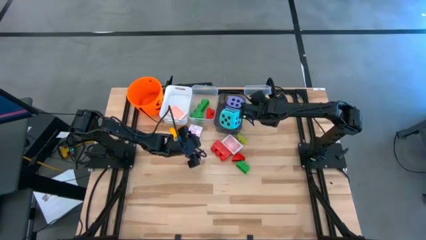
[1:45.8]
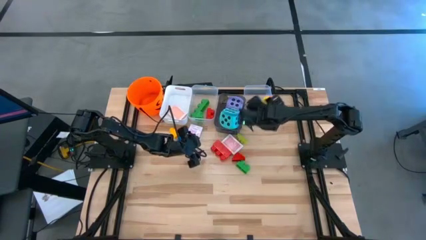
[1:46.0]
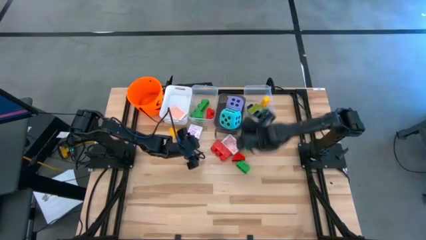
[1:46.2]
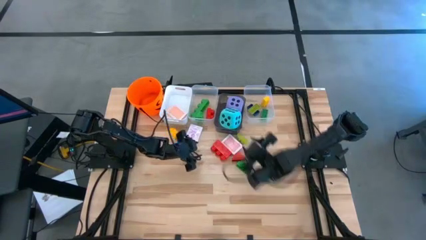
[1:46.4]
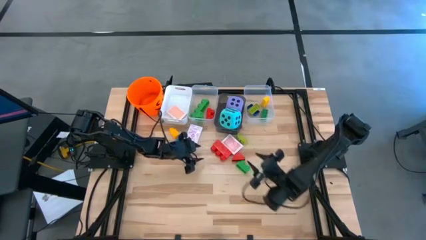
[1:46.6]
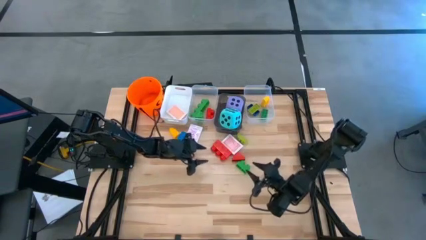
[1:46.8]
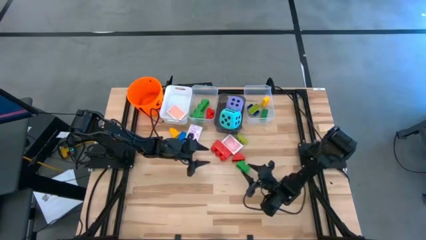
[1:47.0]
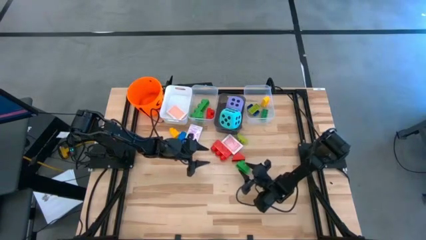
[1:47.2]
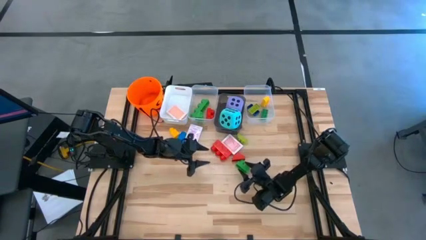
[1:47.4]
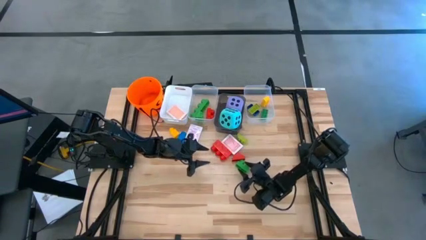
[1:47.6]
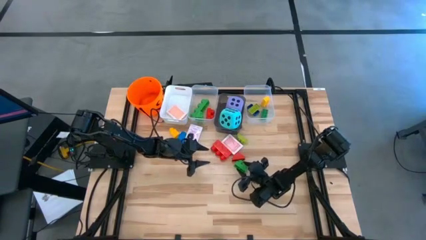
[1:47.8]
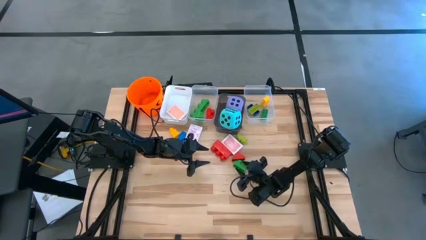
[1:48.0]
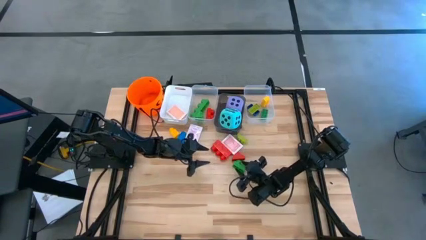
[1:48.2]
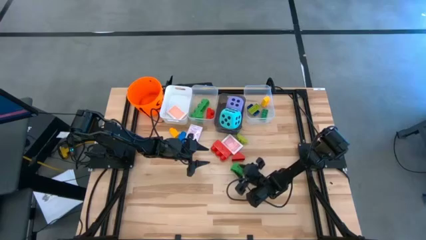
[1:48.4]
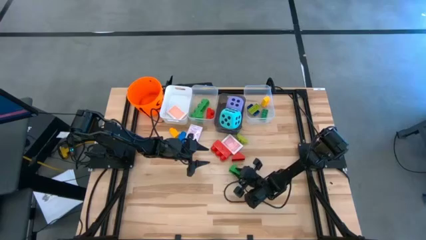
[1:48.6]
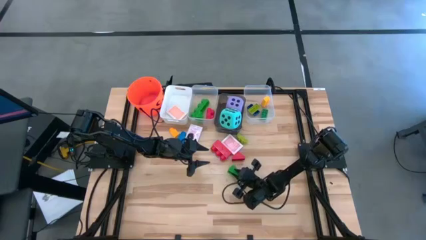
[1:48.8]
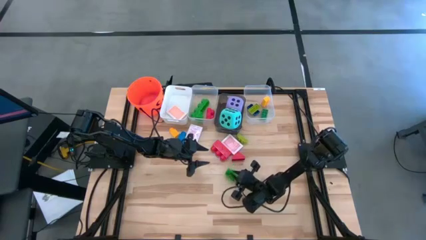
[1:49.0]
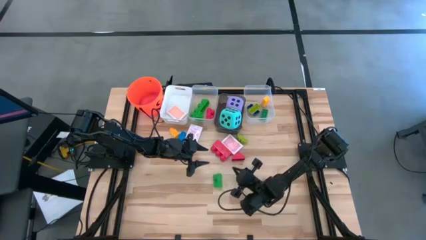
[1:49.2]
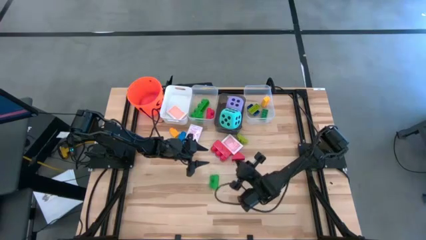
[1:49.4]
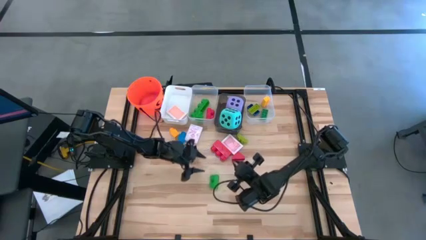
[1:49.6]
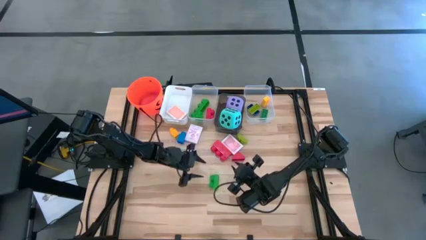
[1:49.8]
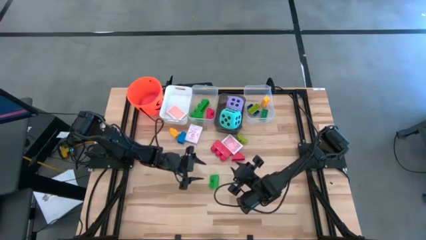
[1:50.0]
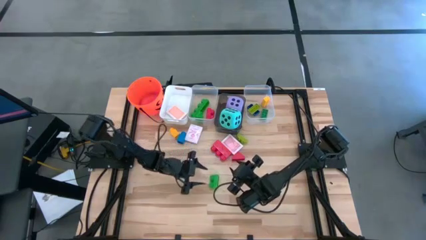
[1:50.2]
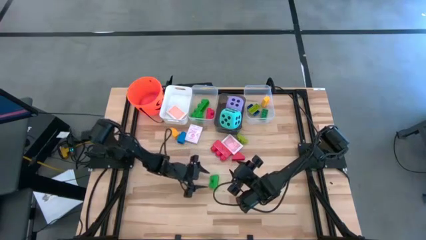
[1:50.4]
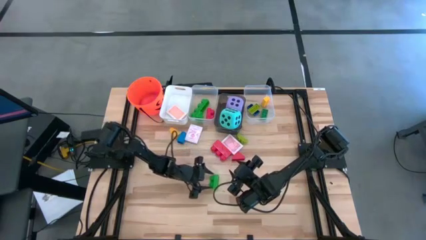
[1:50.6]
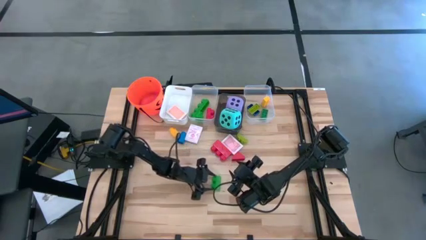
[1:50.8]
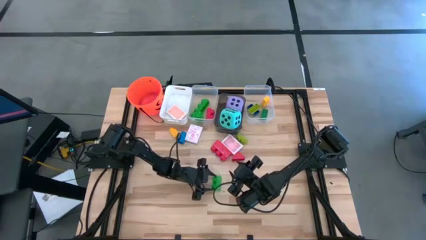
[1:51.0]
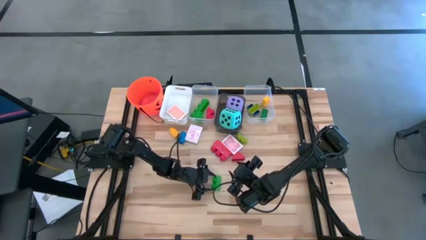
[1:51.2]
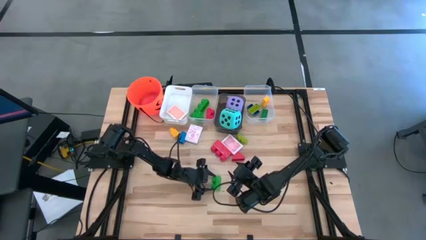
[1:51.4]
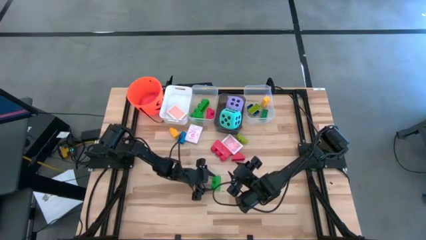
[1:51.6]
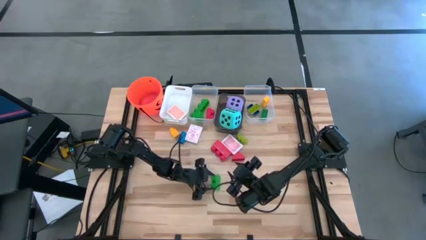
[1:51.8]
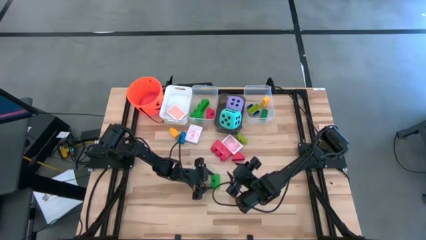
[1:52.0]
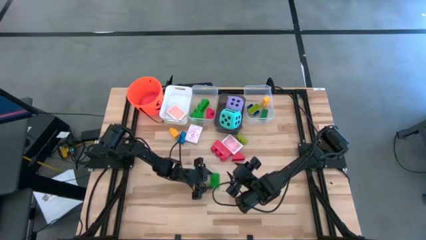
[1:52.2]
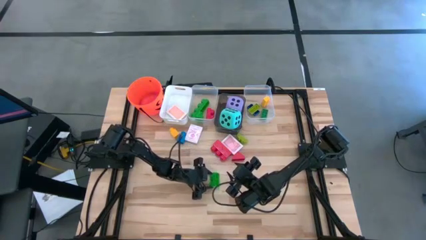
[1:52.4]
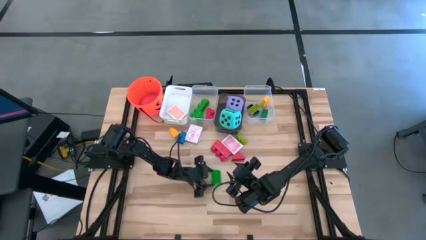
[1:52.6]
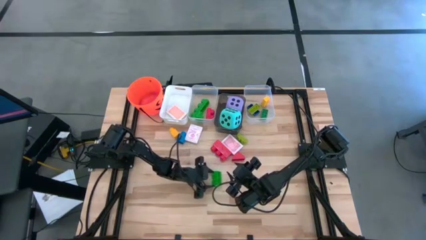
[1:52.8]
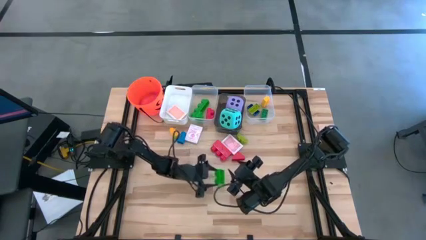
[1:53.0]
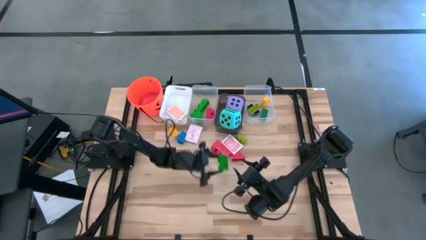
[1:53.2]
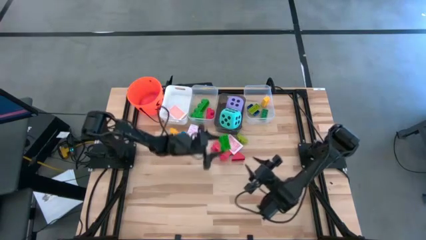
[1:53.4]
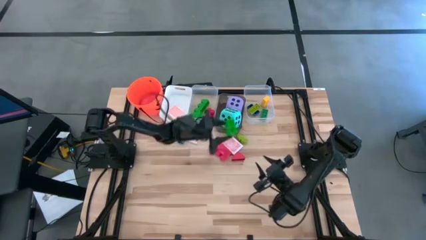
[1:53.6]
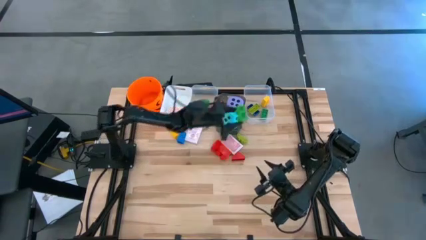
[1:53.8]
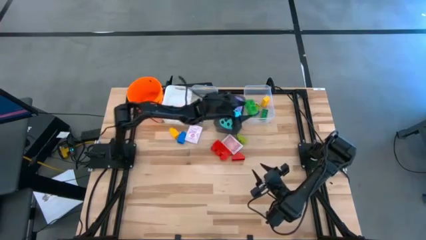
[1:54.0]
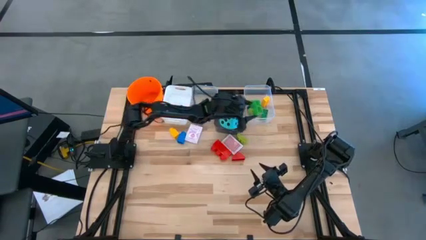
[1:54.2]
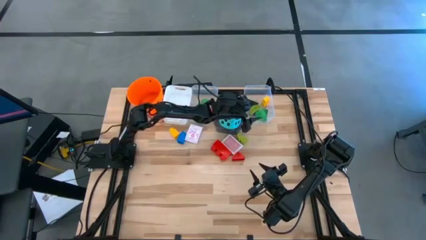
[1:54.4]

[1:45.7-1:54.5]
Task: Pick & Place Toys
Put the large green game piece into the left transparent bin

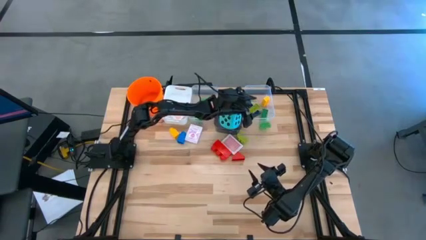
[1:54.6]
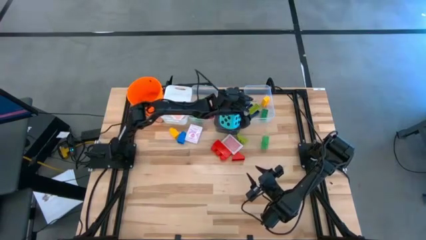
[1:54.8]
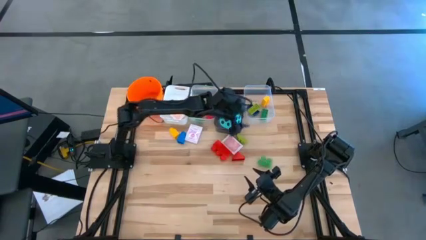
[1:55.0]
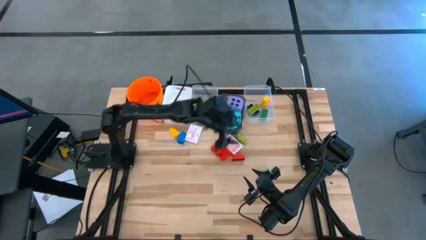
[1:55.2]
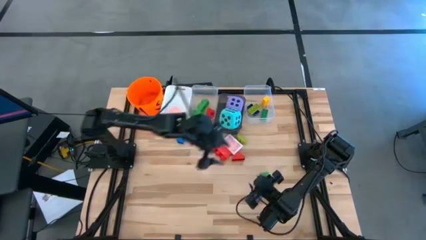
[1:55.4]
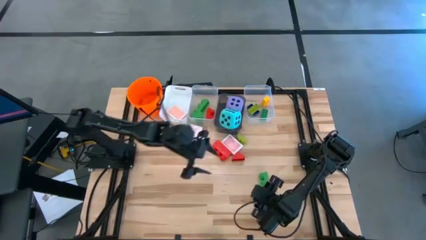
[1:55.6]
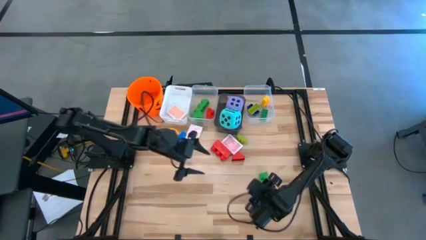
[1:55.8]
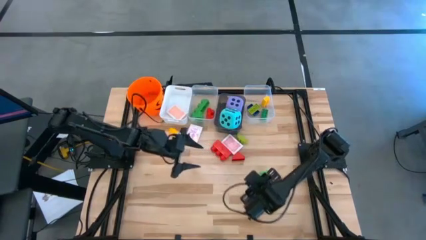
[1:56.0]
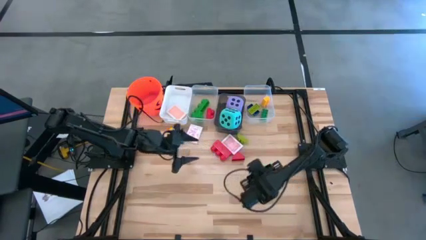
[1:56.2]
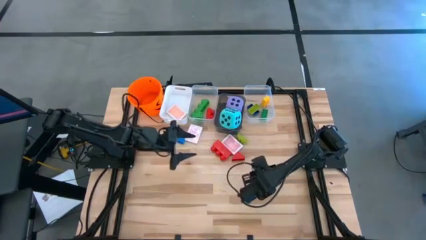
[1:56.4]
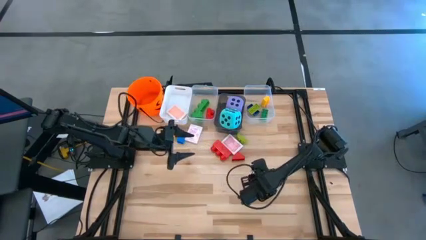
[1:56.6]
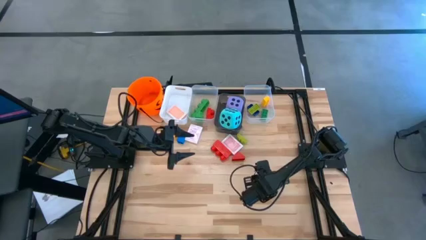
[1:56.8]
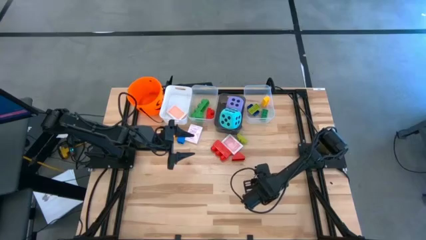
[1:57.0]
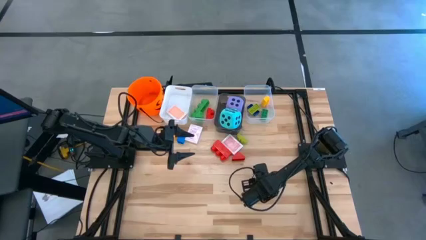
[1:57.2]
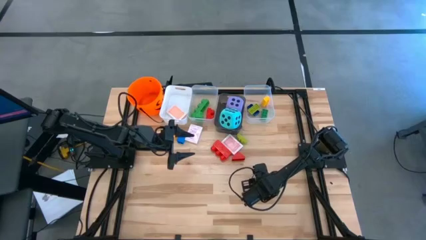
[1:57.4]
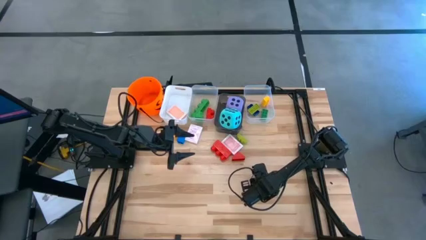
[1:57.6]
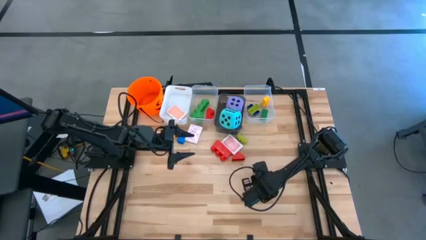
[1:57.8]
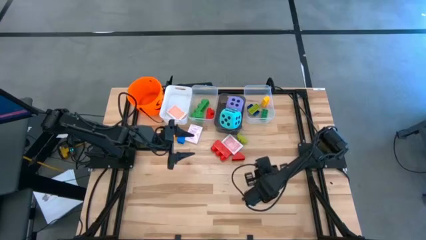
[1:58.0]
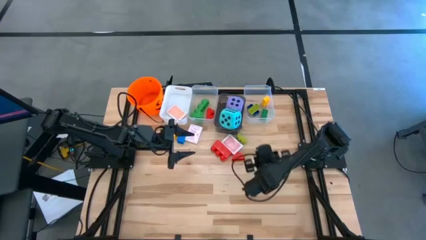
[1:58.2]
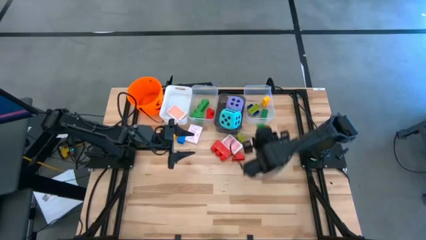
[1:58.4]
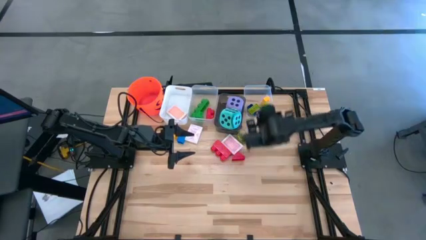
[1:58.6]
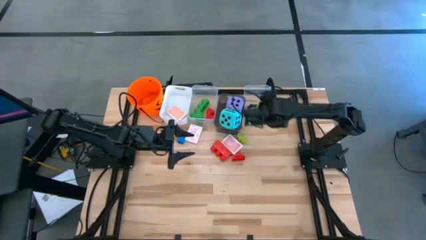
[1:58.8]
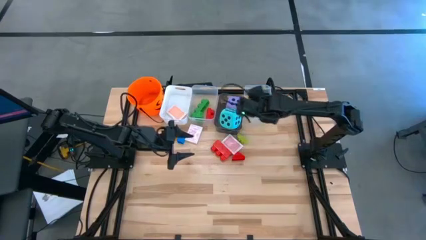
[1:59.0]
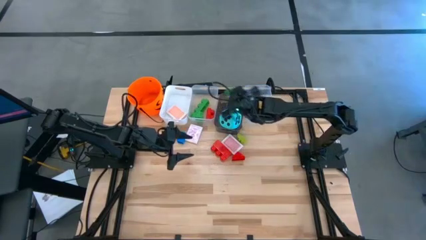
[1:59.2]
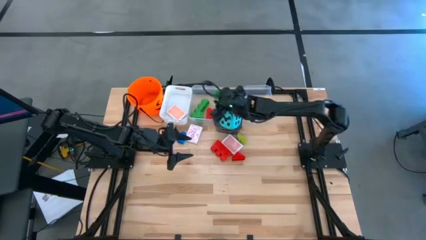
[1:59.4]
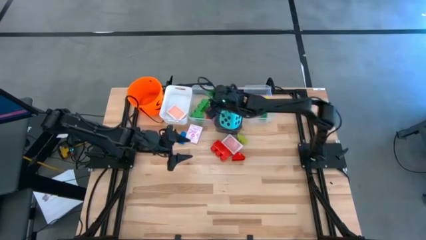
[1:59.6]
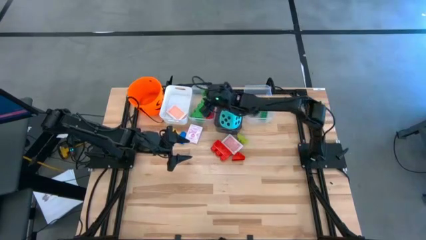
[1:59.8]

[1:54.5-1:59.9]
Put the large green game piece into the left transparent bin

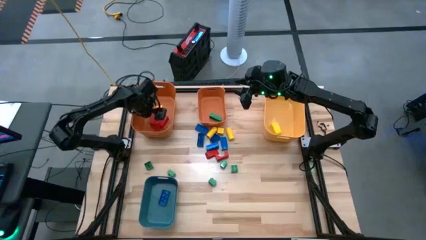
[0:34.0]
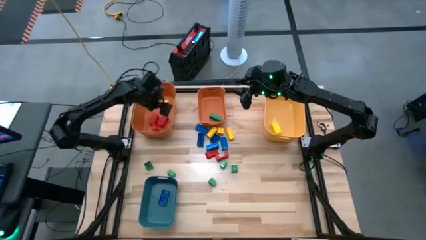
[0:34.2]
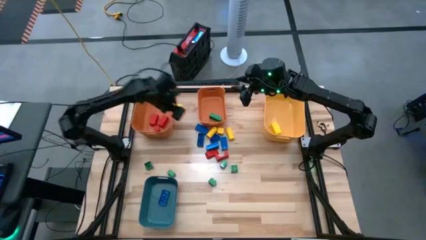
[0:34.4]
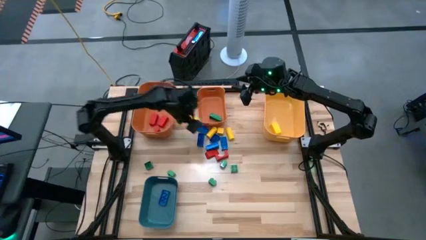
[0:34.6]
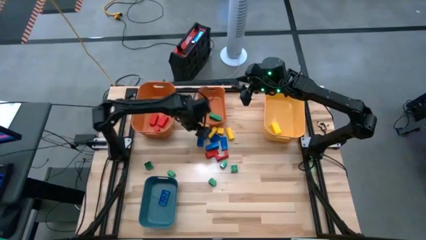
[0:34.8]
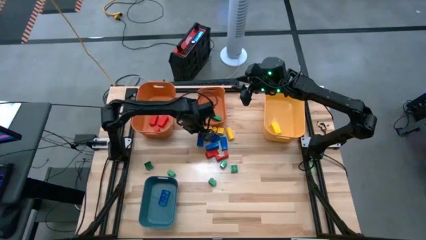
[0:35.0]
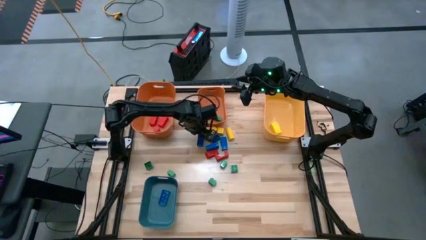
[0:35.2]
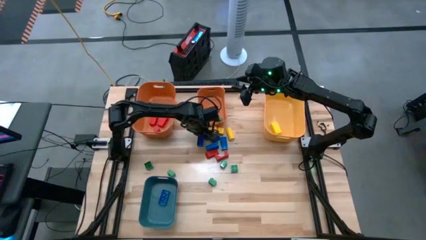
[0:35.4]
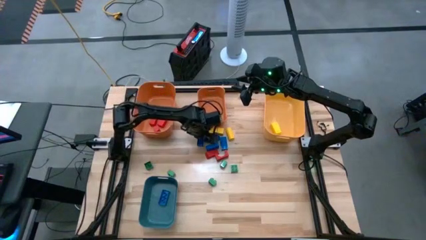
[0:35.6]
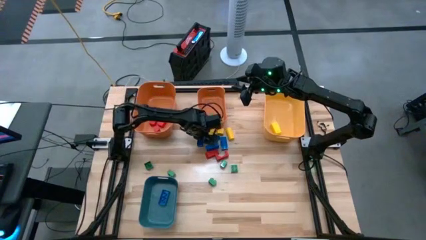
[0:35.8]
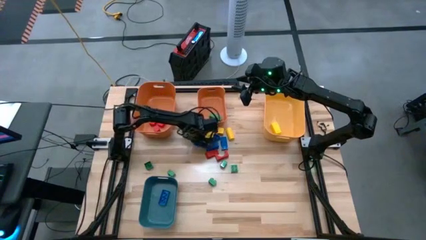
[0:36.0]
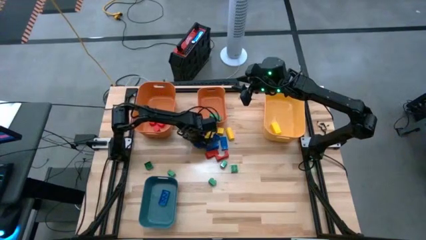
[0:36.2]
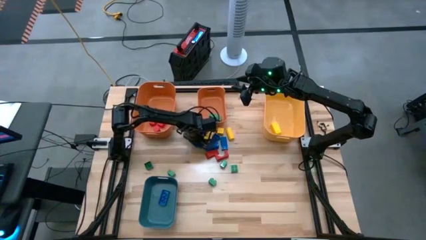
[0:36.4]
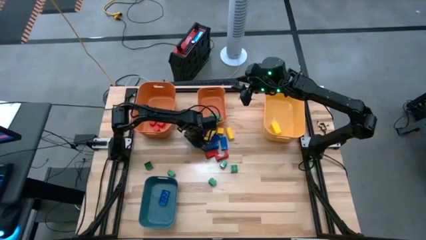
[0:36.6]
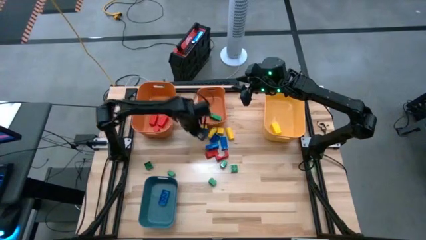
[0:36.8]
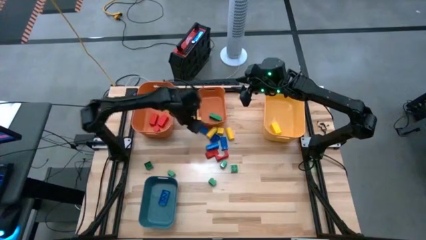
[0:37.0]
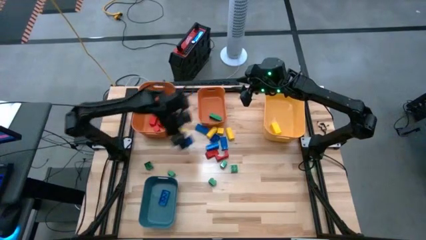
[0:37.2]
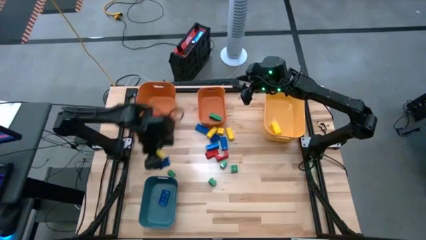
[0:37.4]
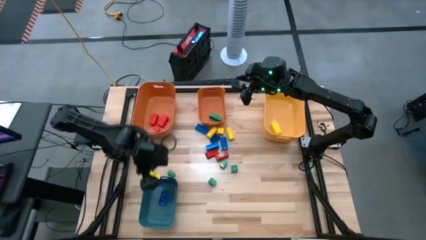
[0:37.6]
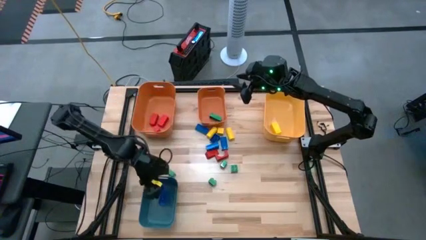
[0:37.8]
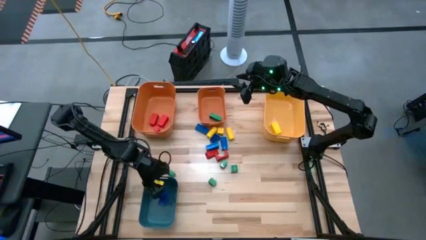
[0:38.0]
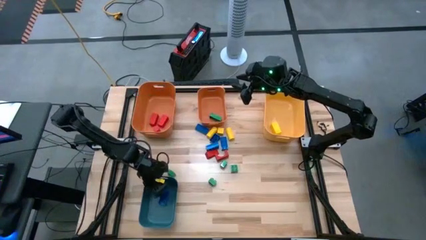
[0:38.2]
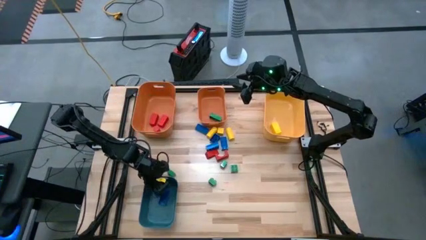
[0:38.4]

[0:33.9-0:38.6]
Task: Sort blocks
Put the blue game piece into the blue bin
